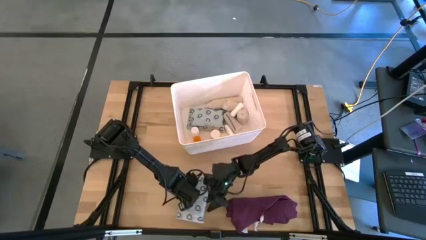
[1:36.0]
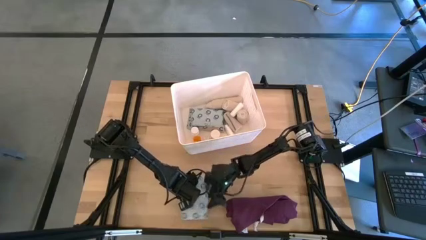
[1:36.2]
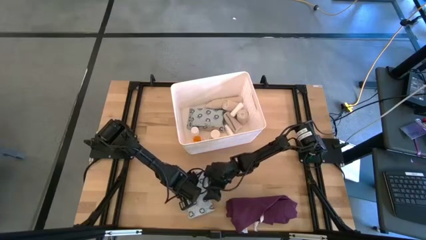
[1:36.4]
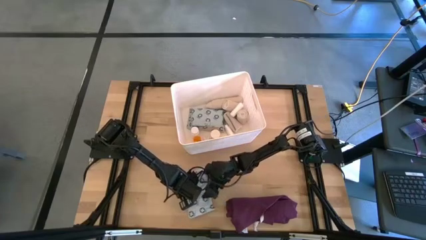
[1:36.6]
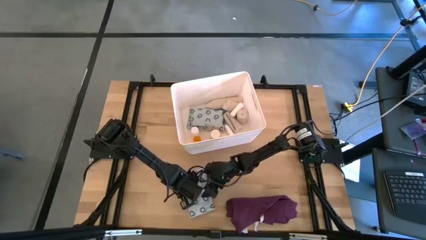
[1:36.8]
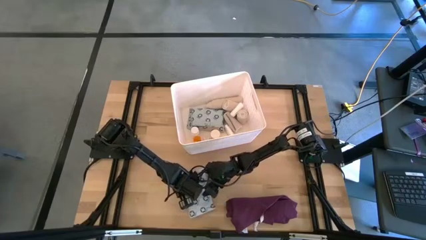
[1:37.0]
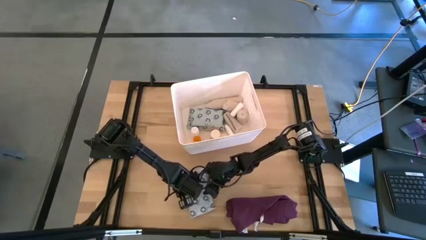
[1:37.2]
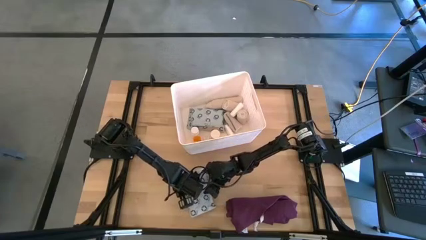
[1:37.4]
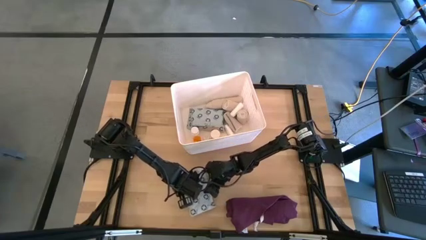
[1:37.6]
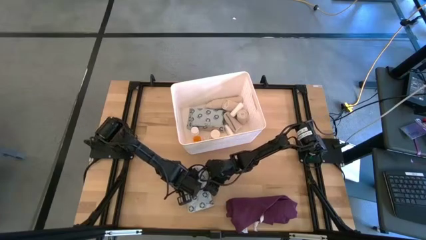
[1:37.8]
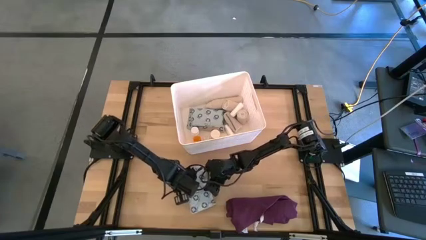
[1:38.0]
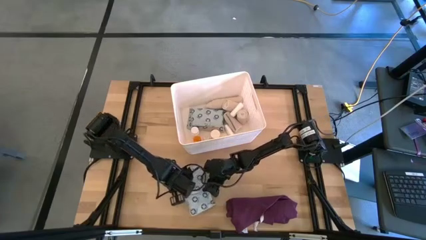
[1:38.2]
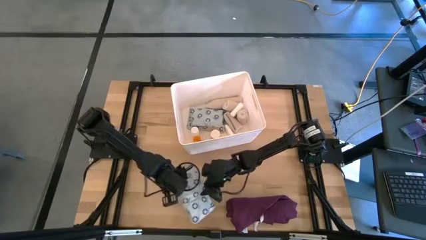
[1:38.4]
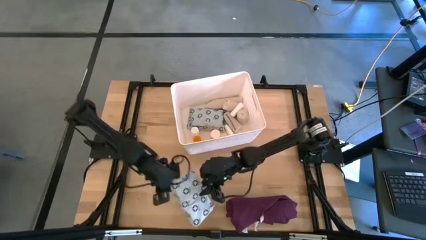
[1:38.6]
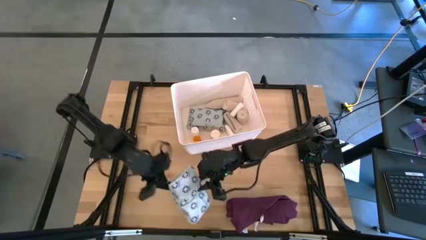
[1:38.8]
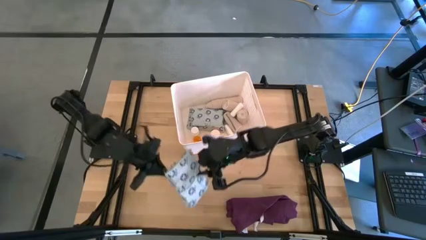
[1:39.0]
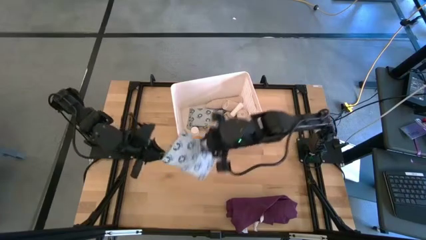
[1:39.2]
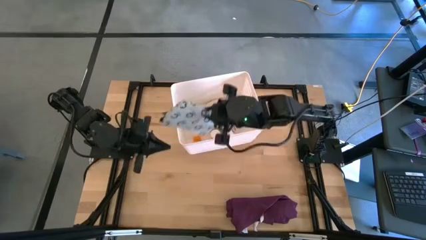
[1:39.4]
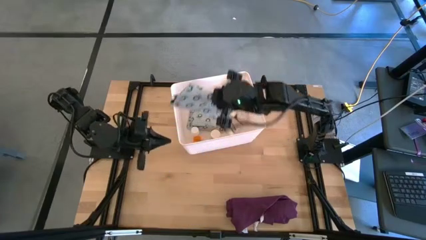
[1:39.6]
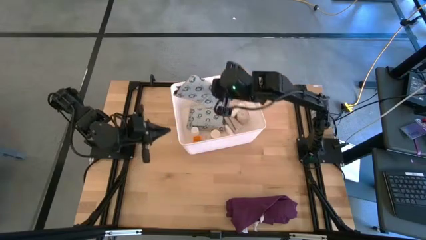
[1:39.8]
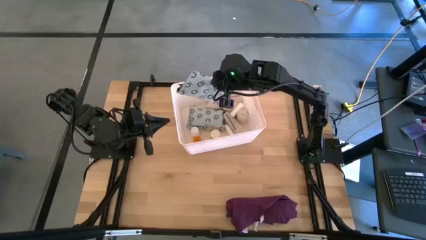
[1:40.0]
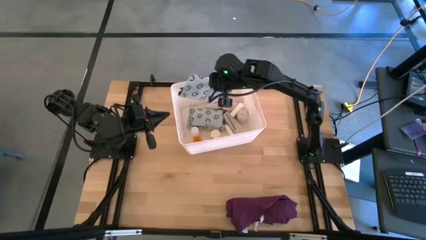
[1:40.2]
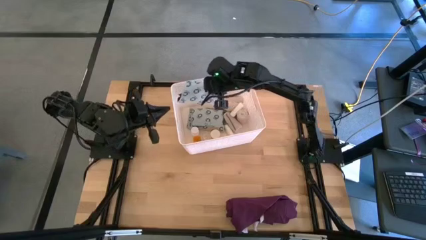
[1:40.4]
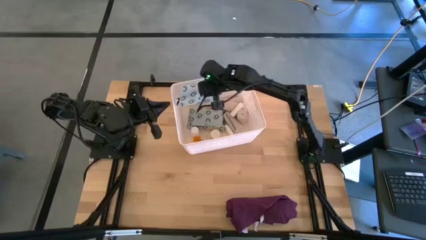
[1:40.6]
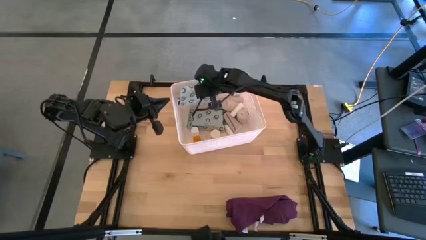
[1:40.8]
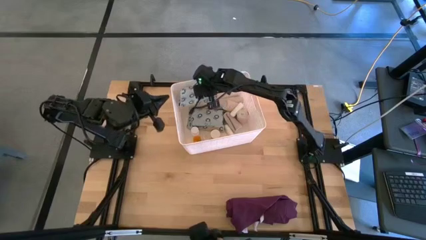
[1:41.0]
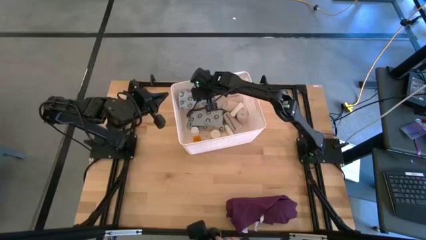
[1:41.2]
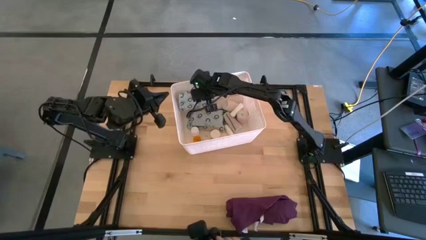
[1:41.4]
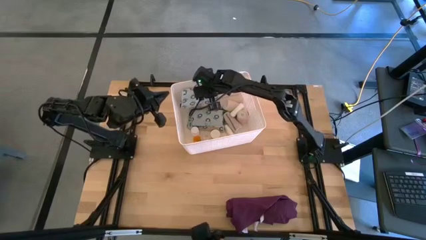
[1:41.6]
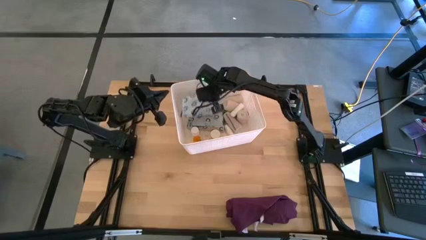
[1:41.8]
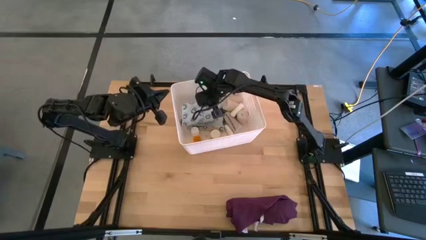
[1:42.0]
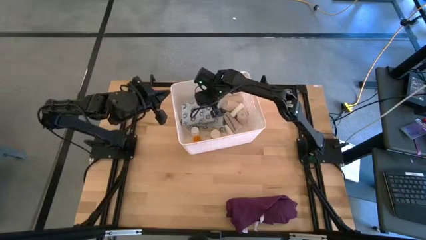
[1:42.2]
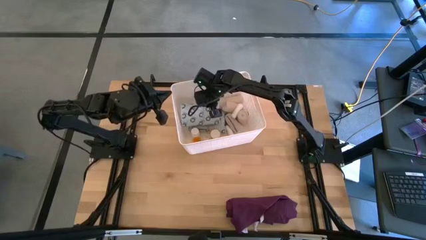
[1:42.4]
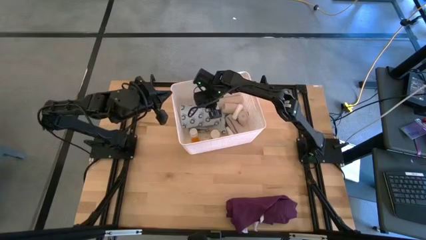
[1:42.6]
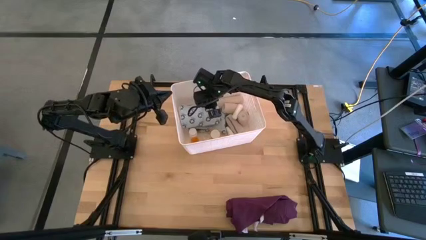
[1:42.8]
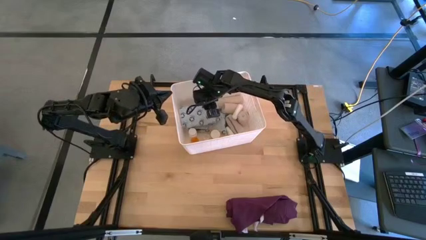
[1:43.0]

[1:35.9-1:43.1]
Task: Pick & place medical supplies in basket/bin
Put the white mailer bag into the white bin

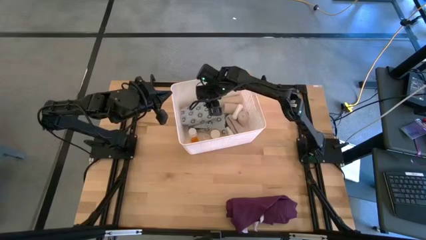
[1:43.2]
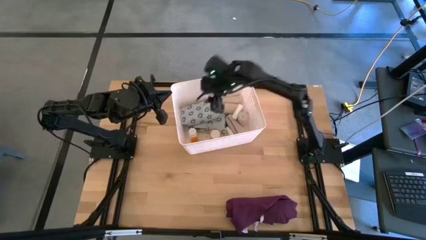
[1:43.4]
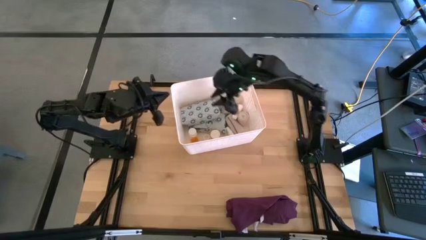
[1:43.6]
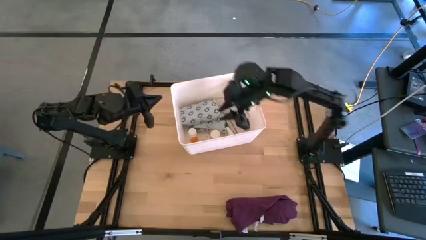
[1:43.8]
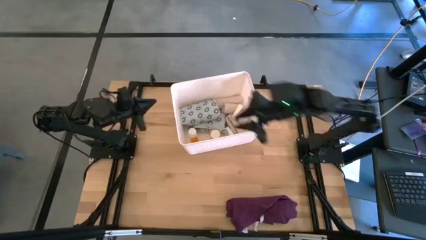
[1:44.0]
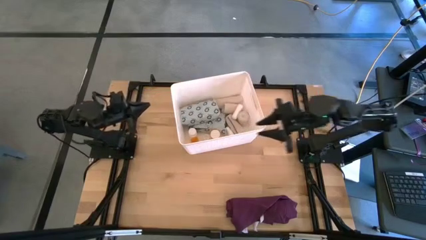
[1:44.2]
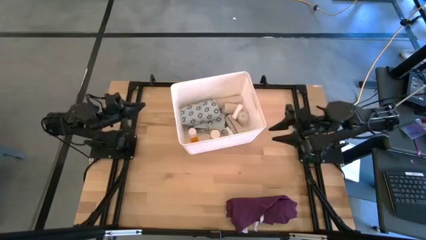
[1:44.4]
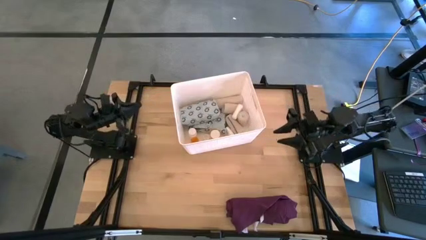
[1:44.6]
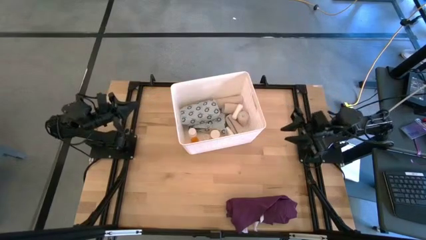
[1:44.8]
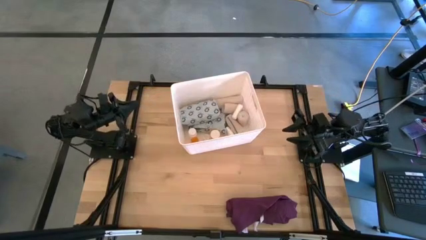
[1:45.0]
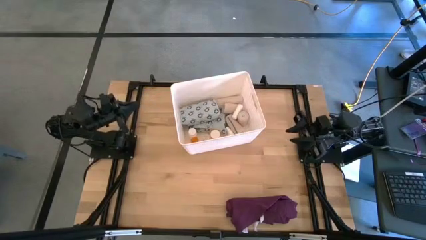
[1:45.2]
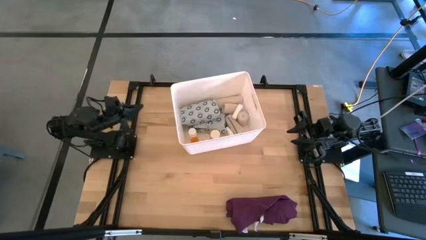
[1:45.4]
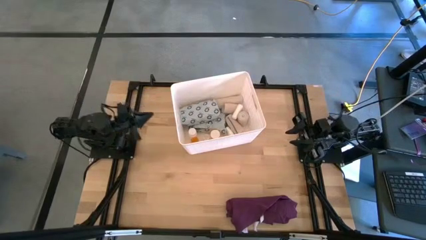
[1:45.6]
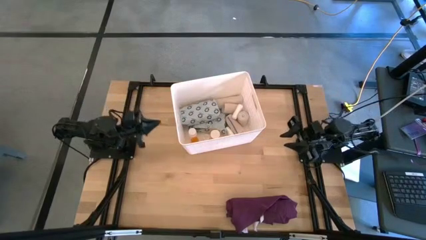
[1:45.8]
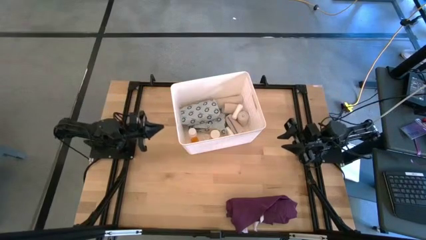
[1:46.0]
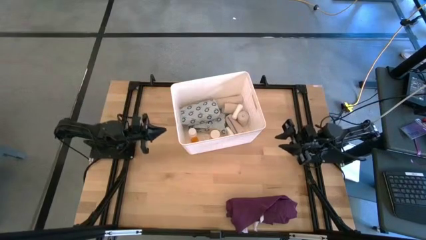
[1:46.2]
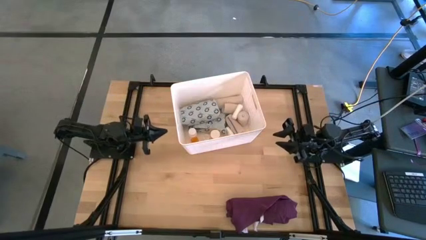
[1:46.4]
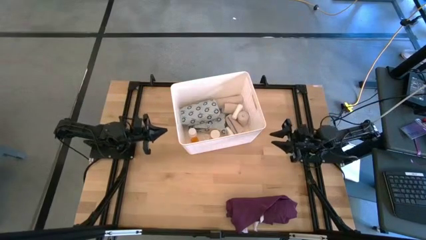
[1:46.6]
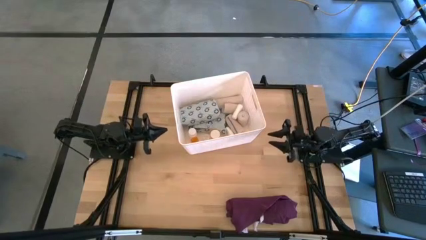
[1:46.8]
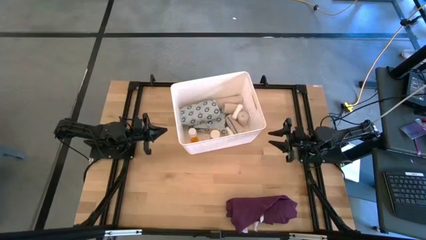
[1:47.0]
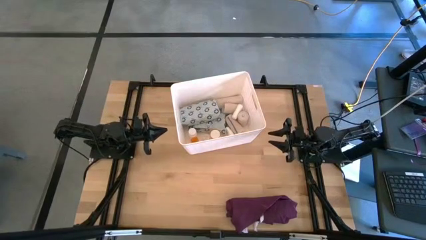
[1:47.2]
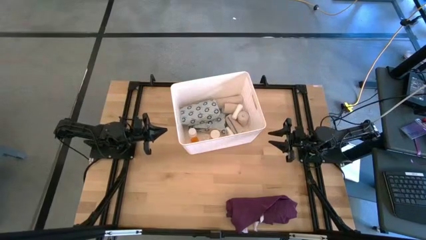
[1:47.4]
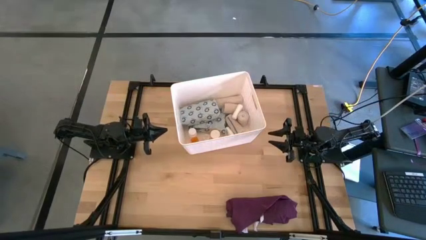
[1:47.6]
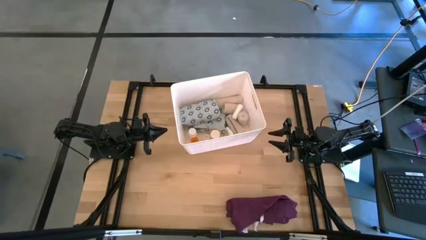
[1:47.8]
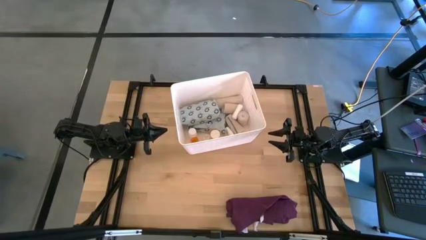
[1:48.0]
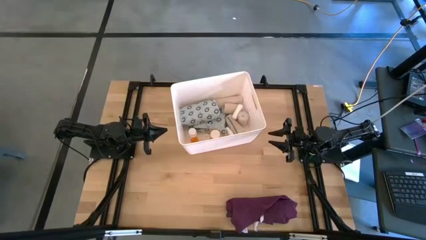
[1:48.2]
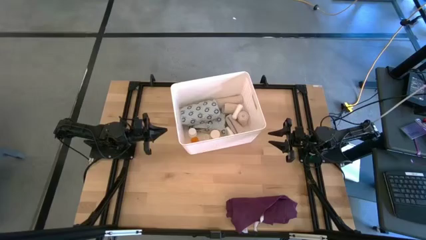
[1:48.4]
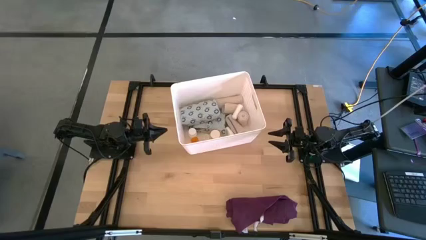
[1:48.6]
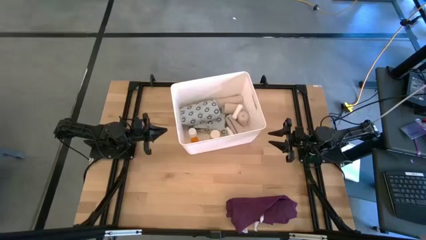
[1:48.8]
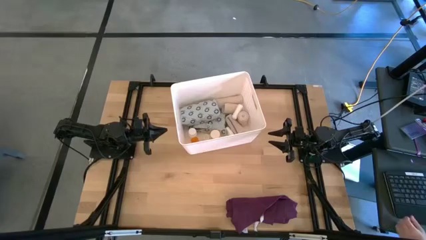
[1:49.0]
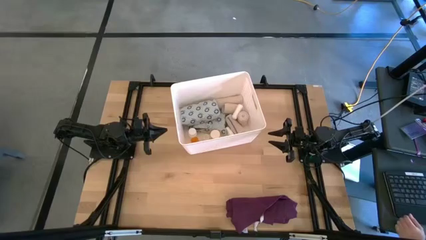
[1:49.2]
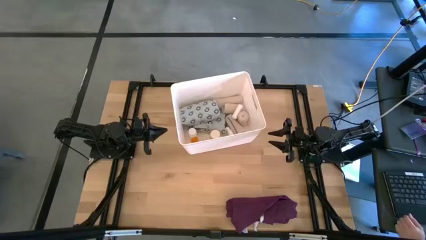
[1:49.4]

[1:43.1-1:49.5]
Return to Home Position

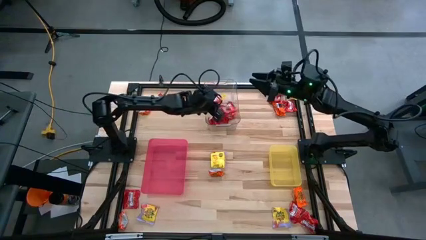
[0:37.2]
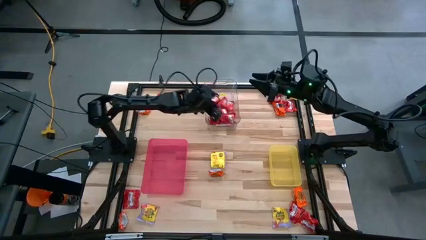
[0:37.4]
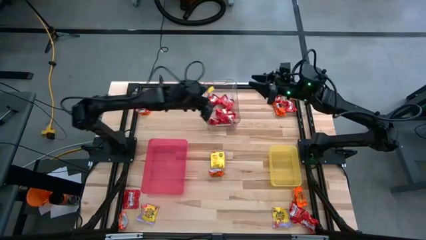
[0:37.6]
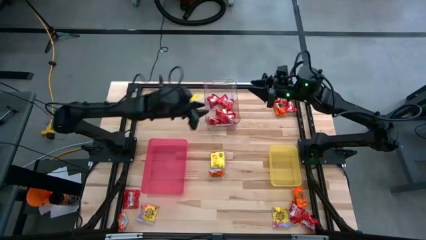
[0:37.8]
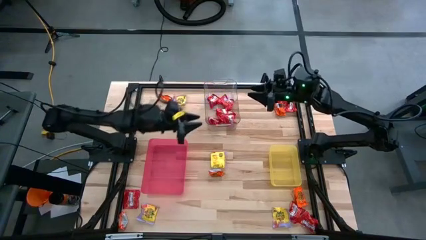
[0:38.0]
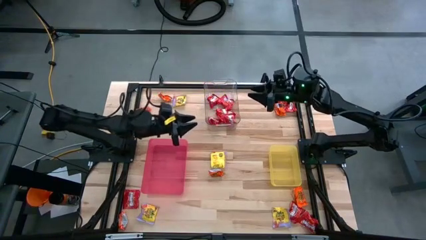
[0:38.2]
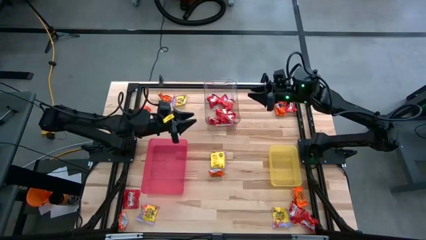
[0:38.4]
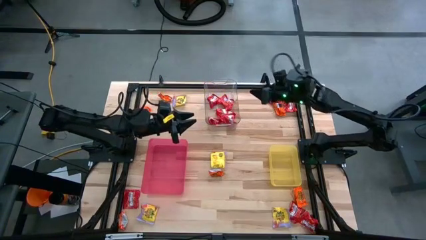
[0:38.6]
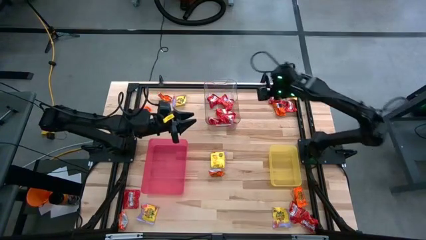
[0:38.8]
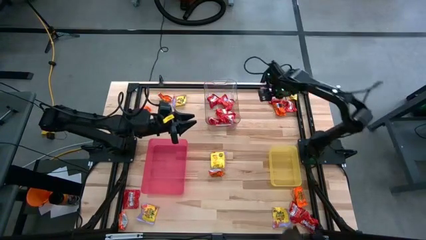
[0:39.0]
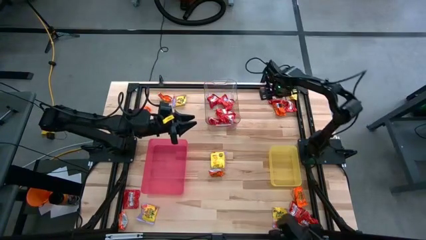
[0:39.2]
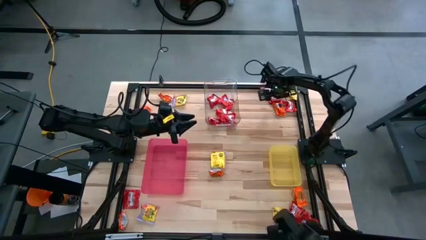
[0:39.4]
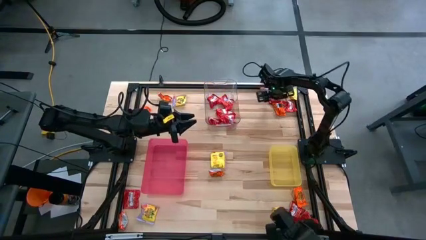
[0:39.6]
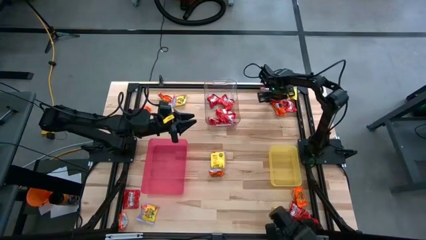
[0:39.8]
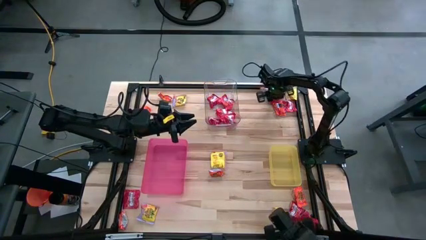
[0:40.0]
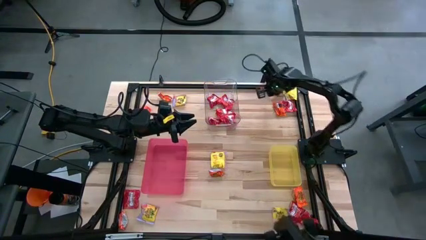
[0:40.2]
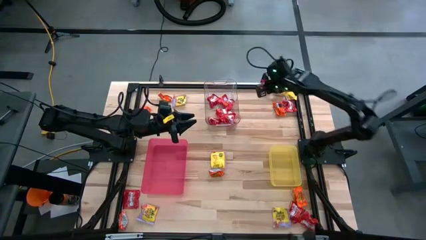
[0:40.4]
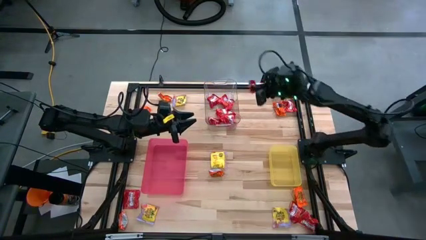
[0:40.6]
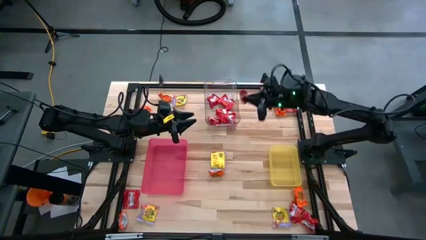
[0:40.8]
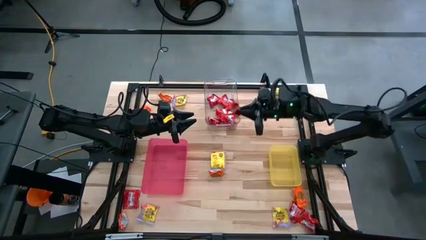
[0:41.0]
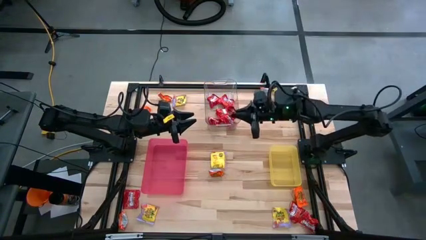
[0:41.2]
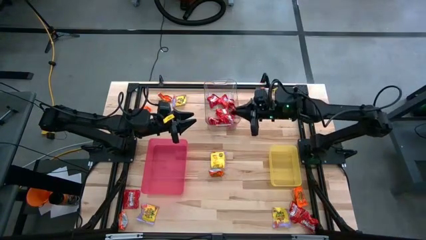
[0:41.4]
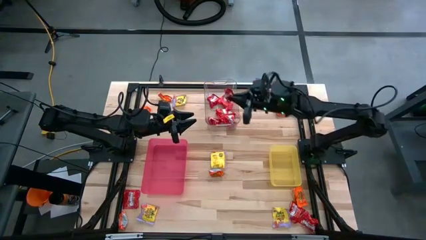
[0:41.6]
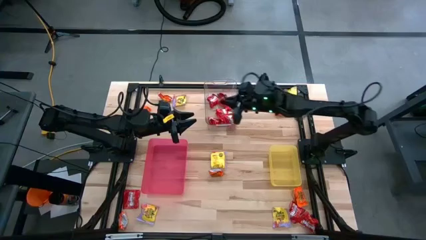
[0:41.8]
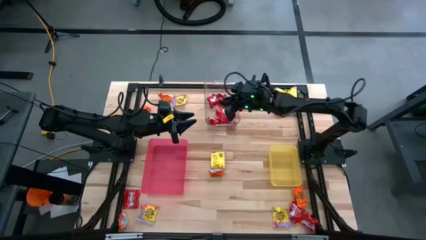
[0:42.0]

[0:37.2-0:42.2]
Task: Sort candy
Put the red candy into the transparent bin
